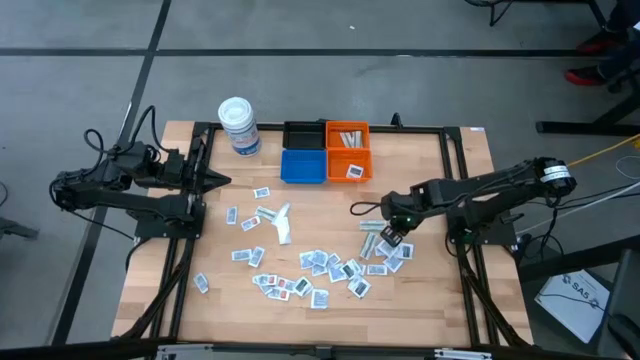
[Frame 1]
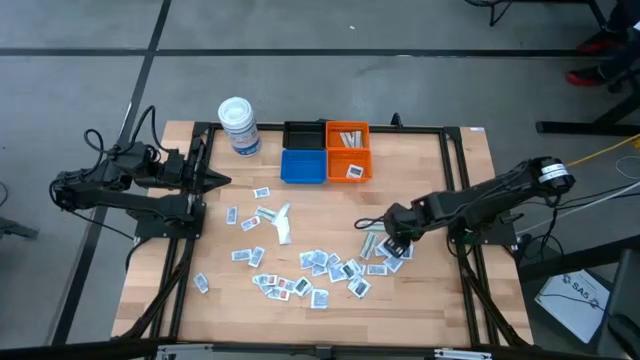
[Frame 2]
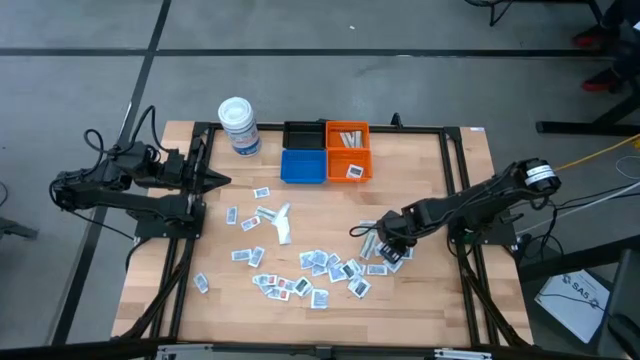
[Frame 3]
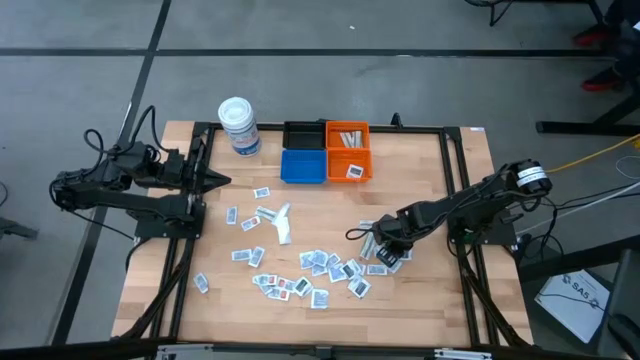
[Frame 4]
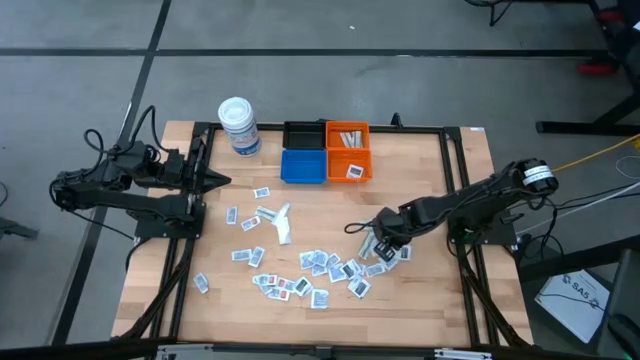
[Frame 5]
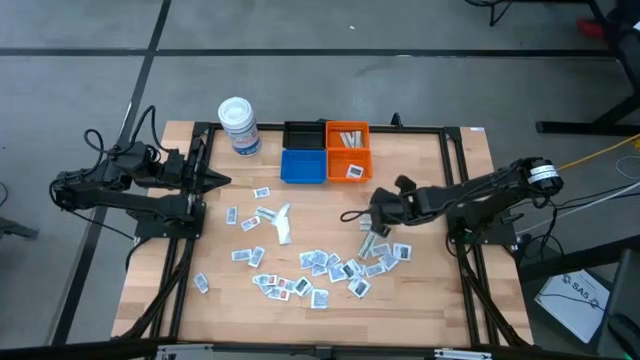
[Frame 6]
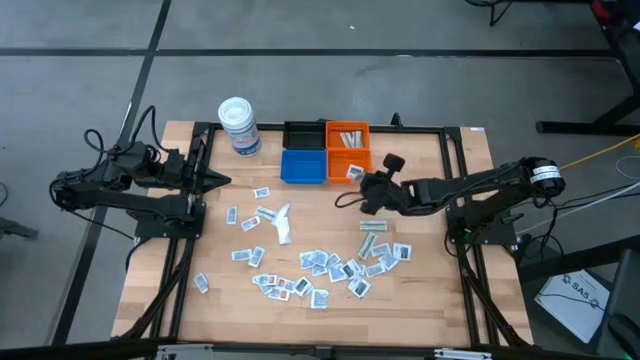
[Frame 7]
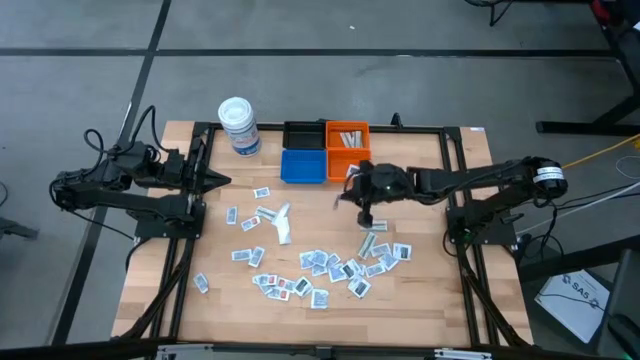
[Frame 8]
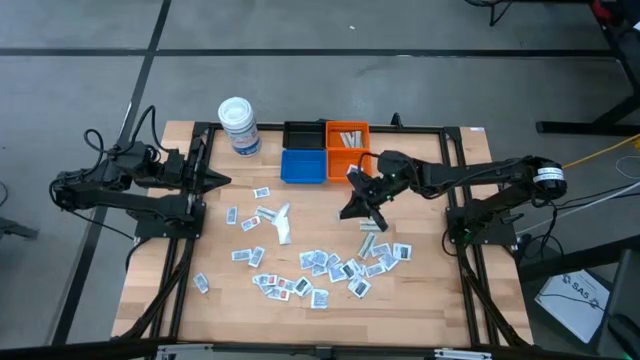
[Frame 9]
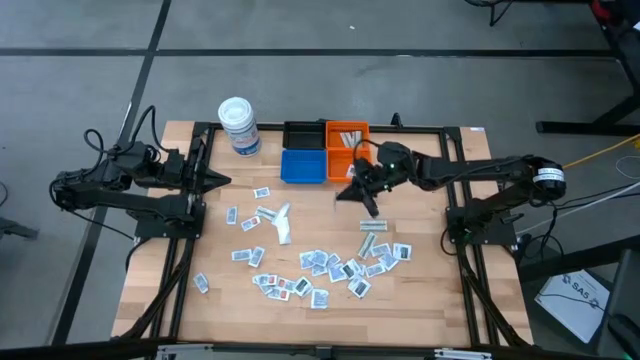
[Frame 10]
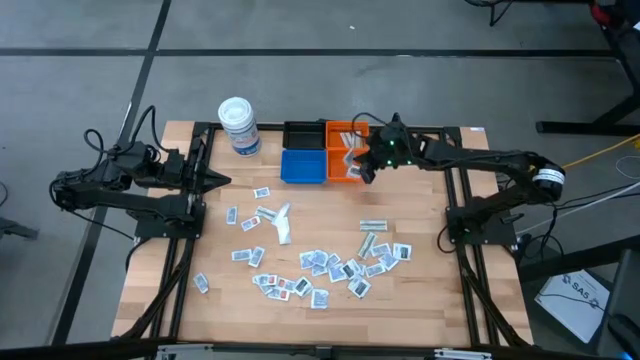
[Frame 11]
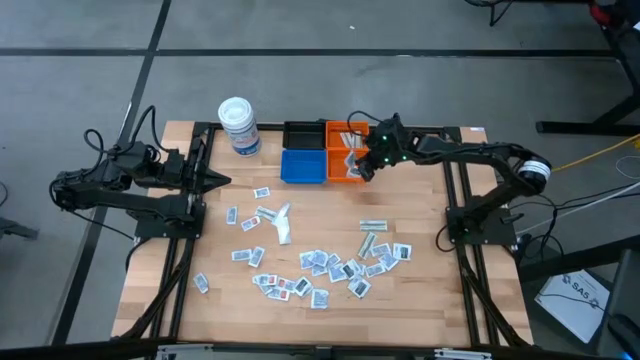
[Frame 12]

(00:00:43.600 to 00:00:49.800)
Task: Pick & Place First Aid Supplies
Put the towelette pack into the bottom orange bin

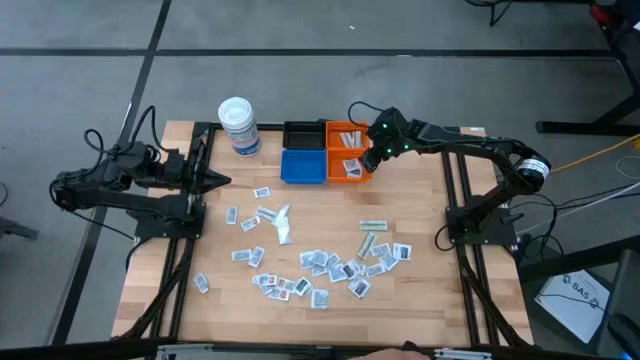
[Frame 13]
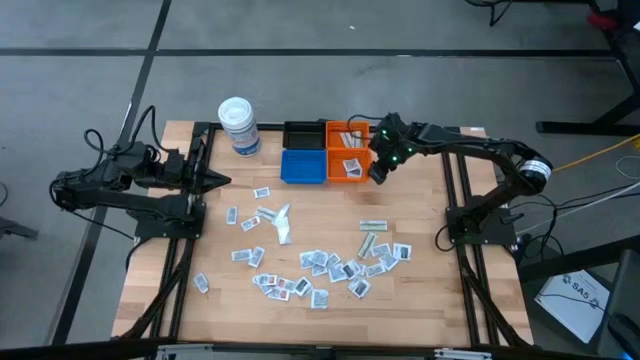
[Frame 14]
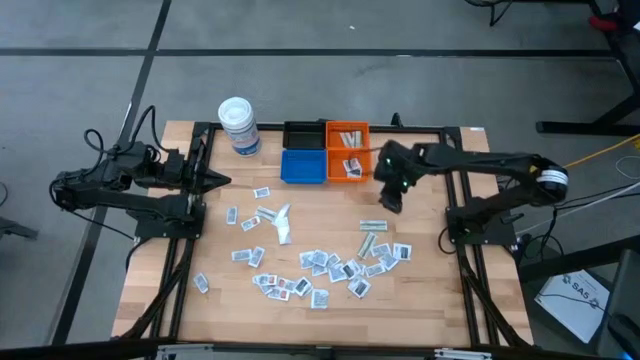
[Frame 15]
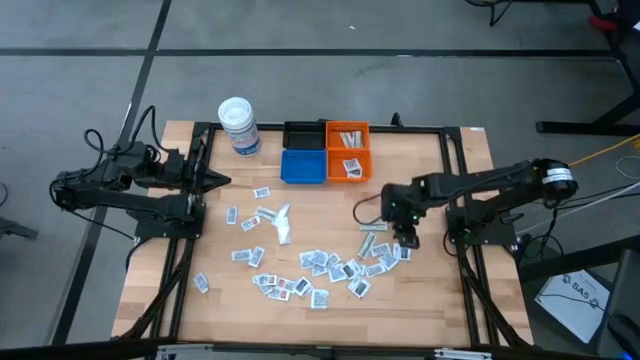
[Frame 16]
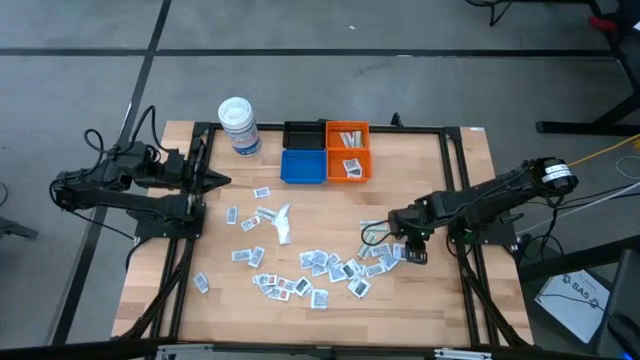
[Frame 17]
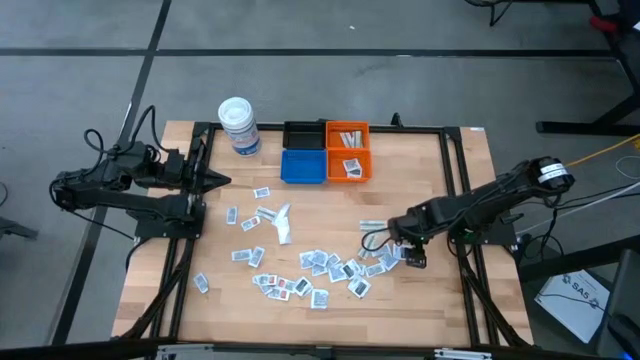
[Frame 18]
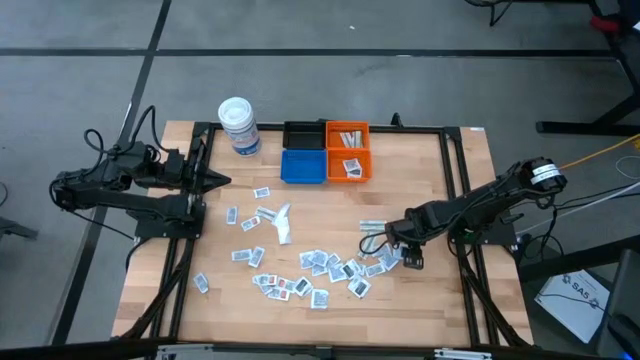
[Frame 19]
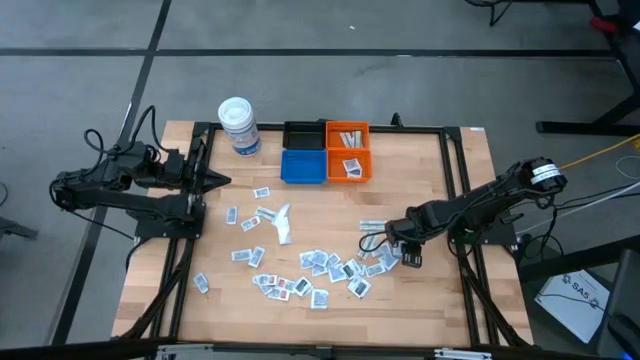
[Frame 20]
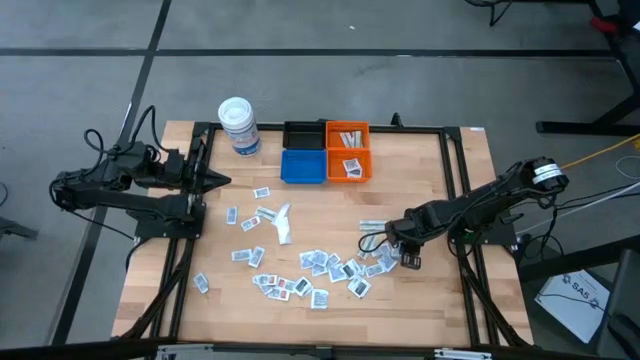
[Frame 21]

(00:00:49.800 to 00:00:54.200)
Put the towelette pack into the bottom orange bin

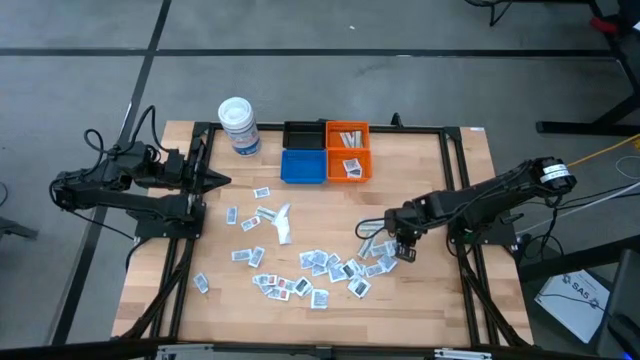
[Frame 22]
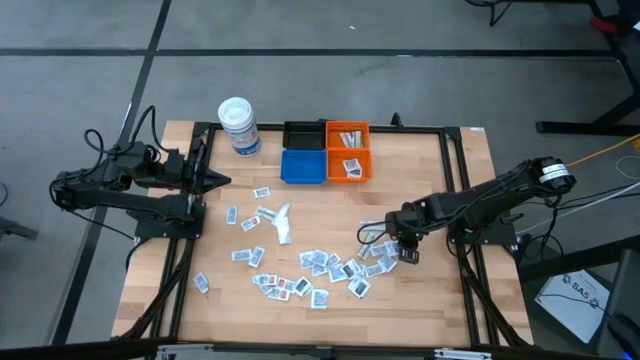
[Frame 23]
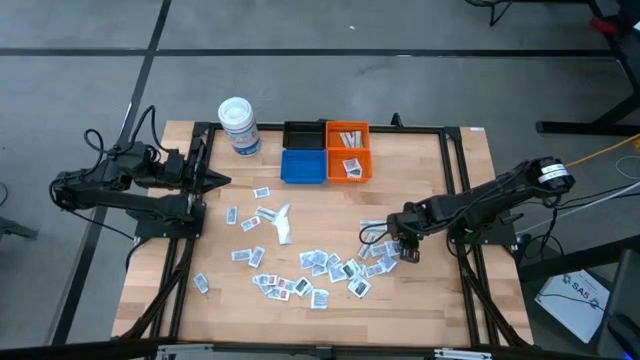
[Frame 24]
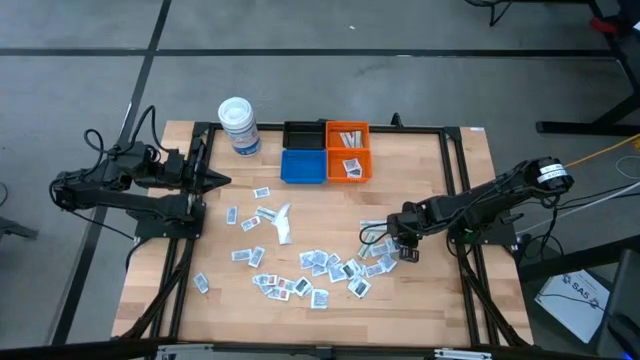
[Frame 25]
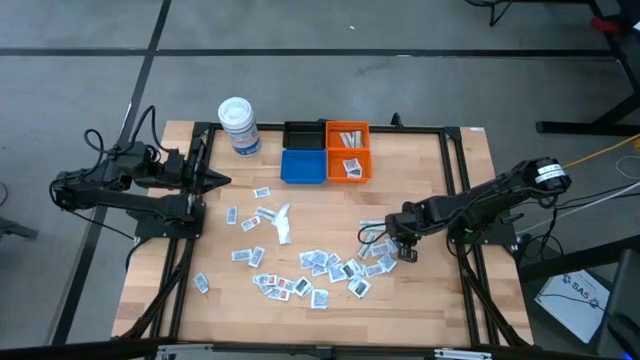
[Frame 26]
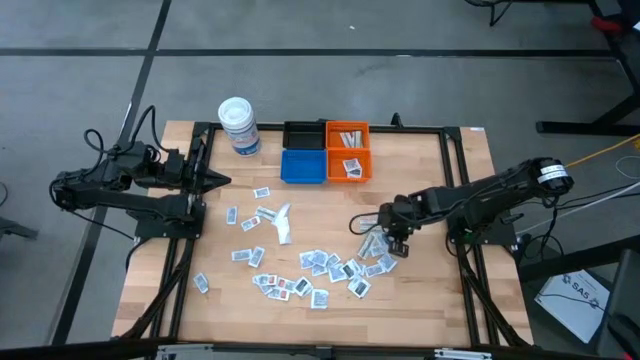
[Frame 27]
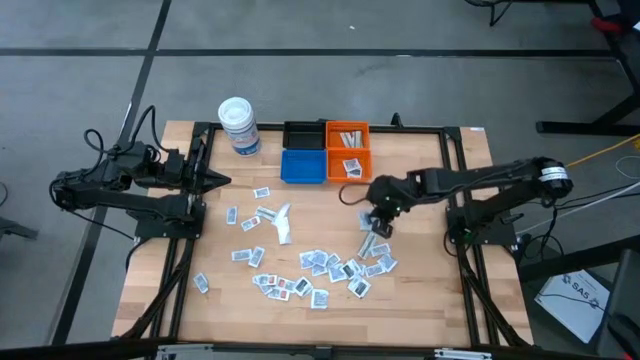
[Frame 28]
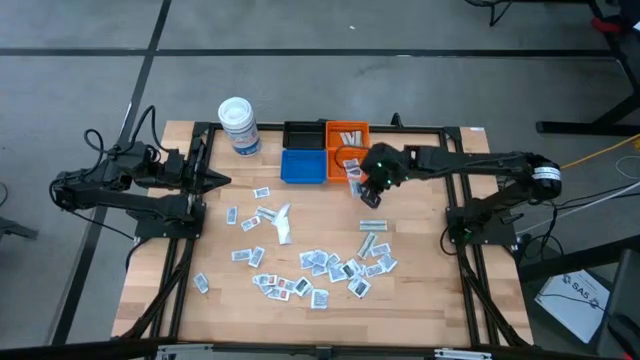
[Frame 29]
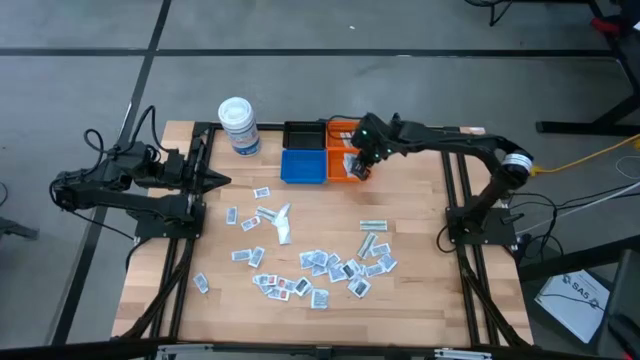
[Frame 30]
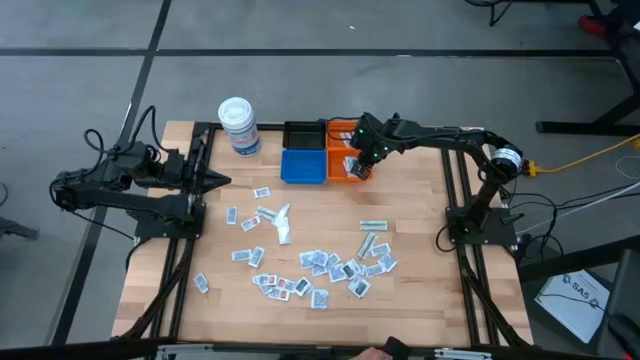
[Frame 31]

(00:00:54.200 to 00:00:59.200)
Put the towelette pack into the bottom orange bin

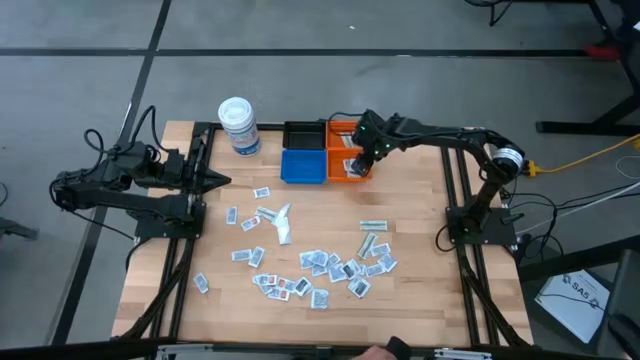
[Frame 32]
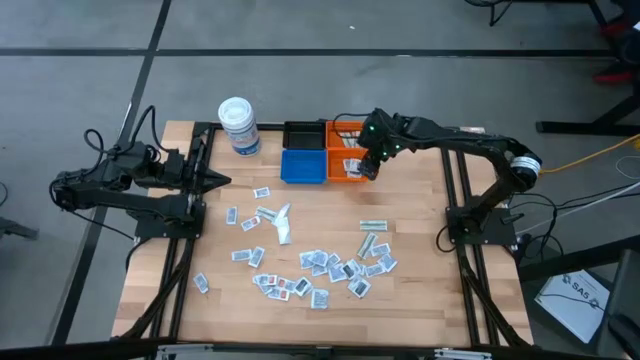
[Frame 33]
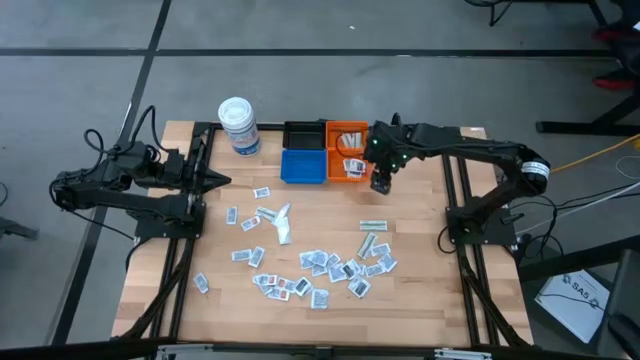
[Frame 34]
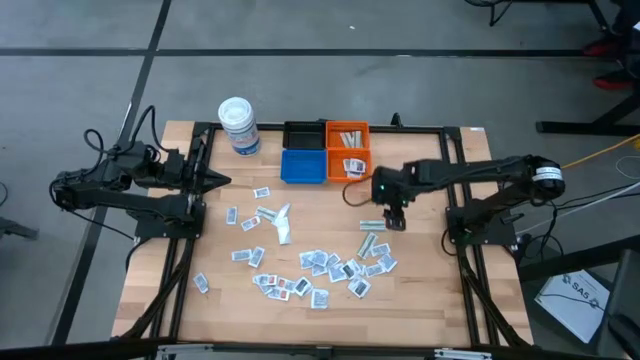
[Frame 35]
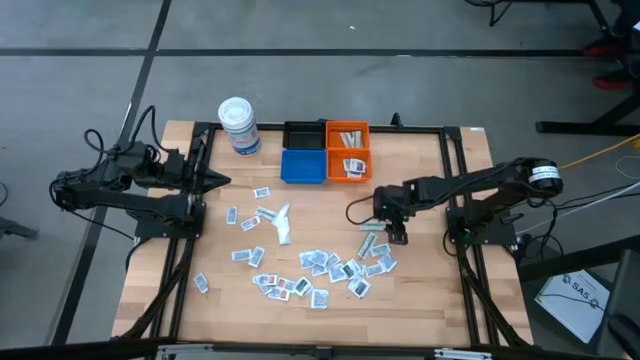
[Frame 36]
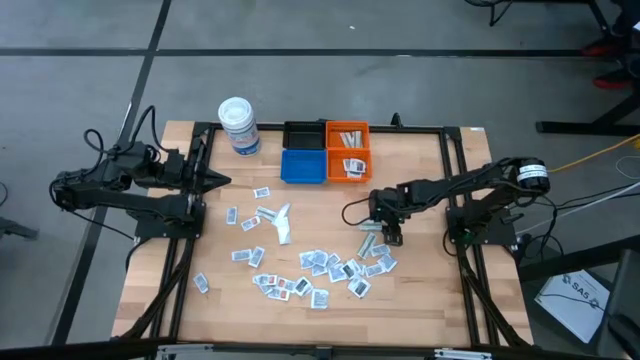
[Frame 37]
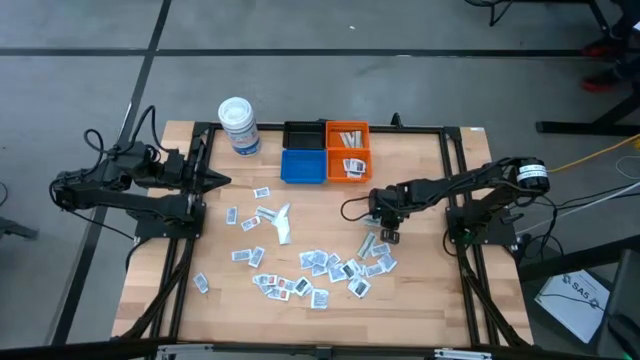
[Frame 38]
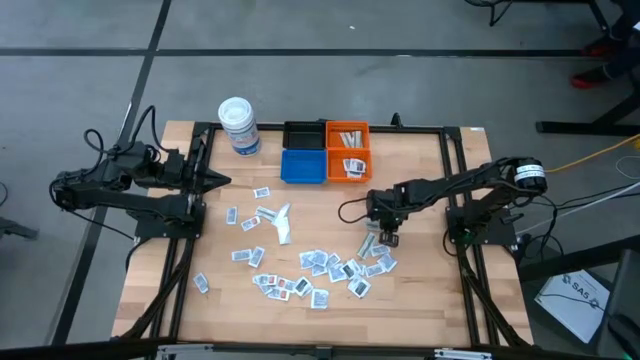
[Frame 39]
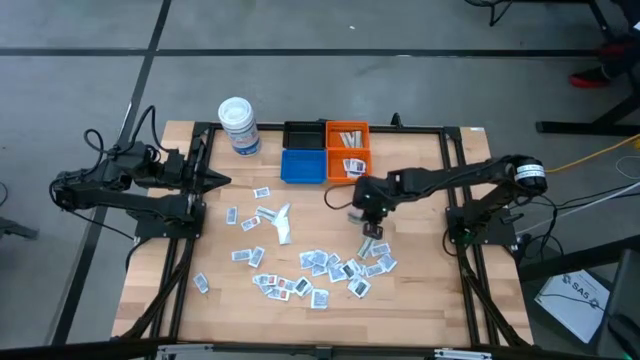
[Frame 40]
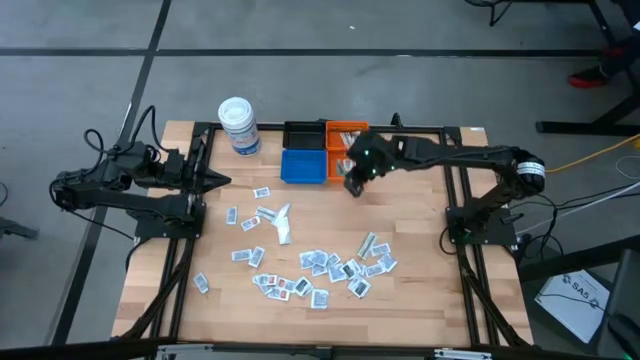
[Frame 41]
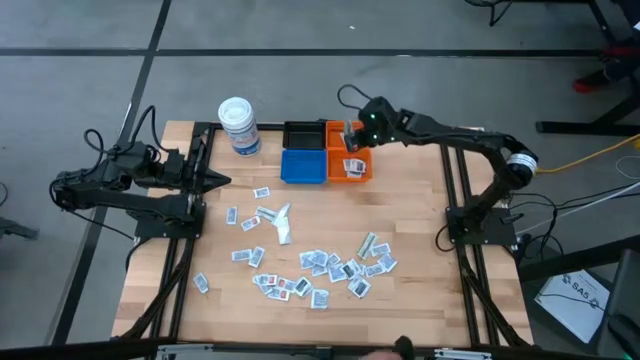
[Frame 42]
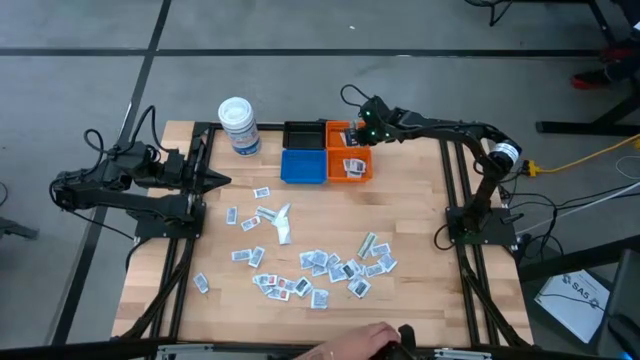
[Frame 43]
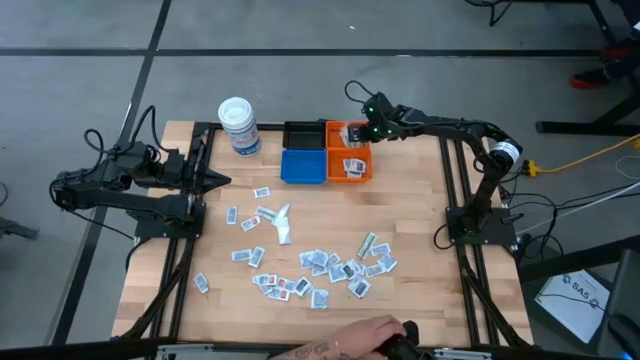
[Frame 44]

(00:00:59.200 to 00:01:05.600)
Put the bandage pack into the top orange bin
